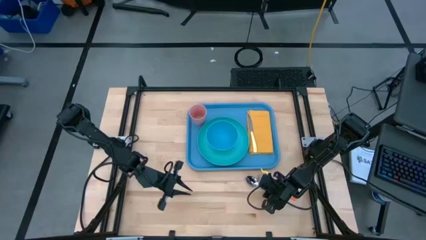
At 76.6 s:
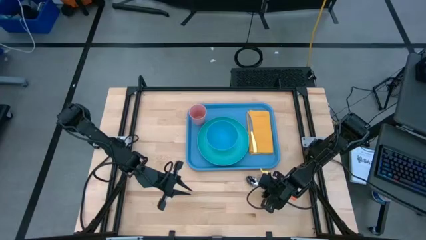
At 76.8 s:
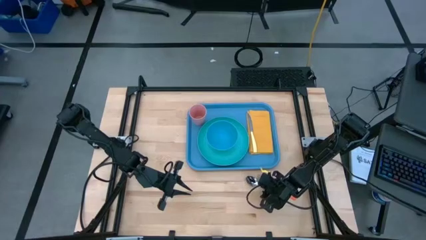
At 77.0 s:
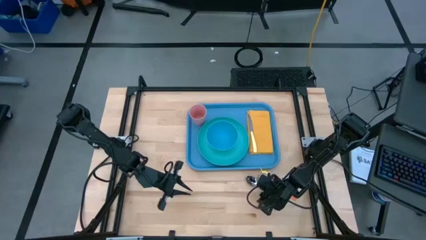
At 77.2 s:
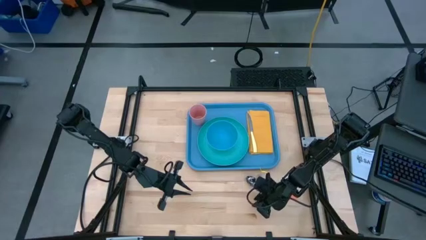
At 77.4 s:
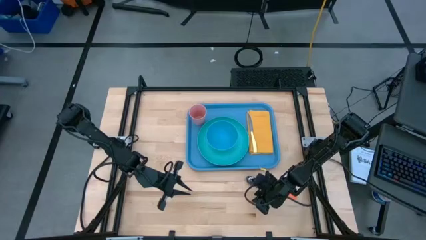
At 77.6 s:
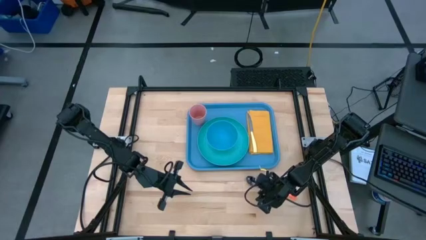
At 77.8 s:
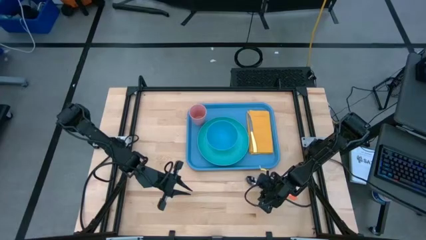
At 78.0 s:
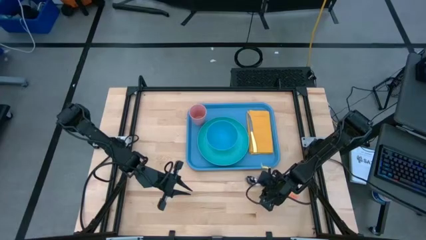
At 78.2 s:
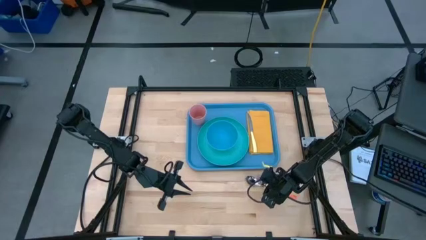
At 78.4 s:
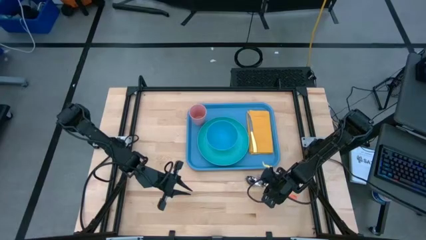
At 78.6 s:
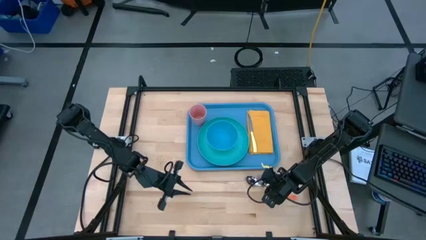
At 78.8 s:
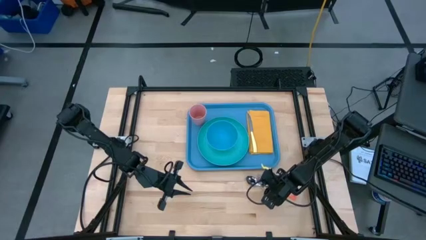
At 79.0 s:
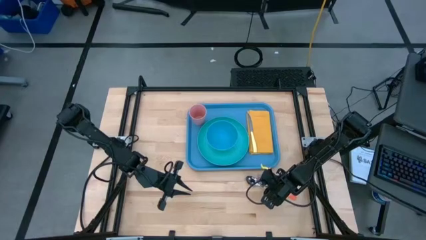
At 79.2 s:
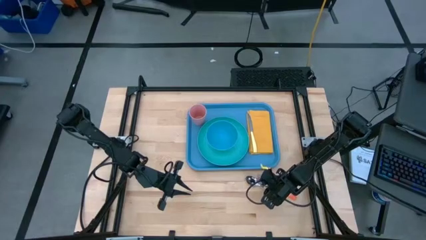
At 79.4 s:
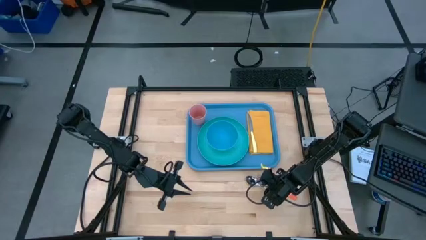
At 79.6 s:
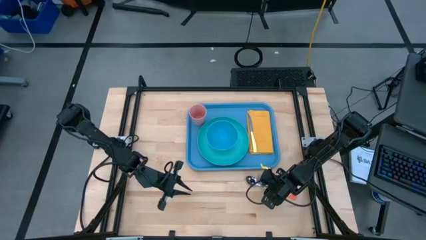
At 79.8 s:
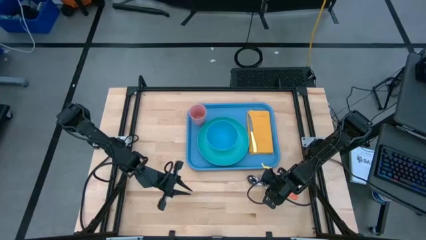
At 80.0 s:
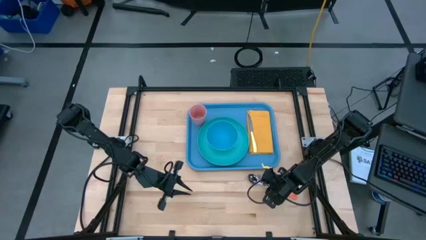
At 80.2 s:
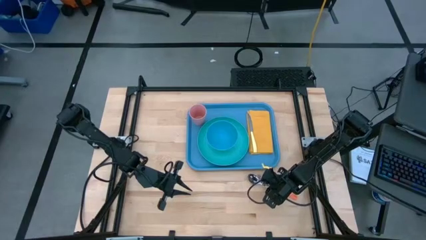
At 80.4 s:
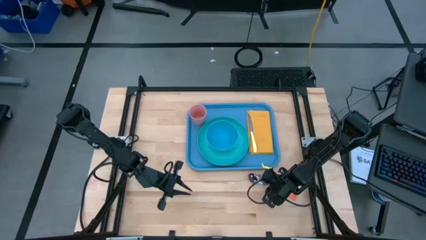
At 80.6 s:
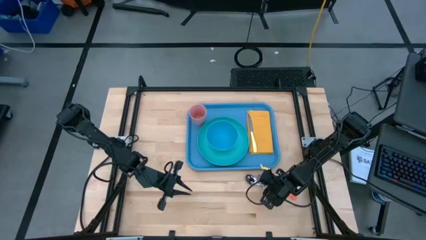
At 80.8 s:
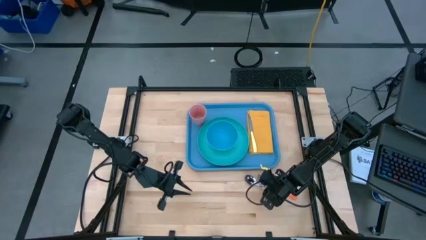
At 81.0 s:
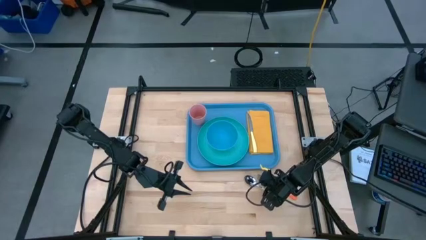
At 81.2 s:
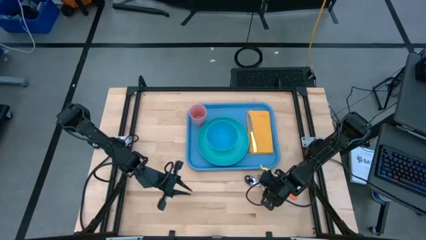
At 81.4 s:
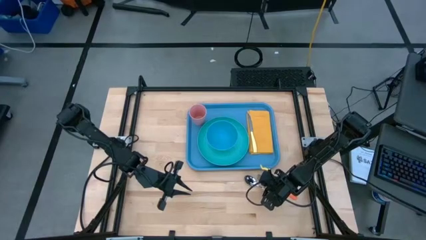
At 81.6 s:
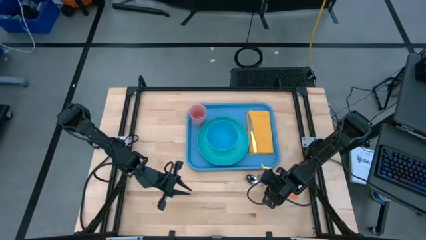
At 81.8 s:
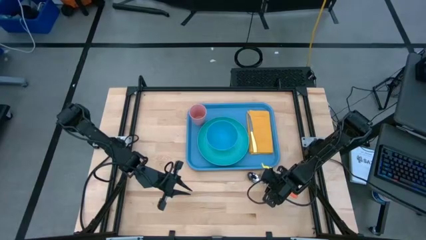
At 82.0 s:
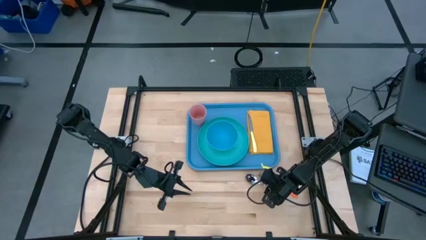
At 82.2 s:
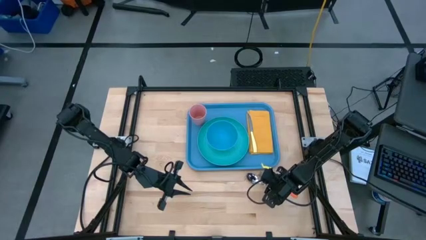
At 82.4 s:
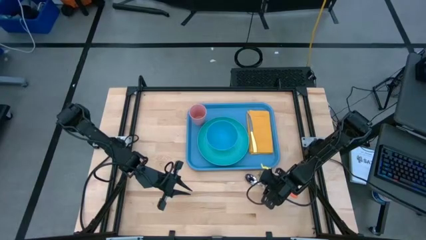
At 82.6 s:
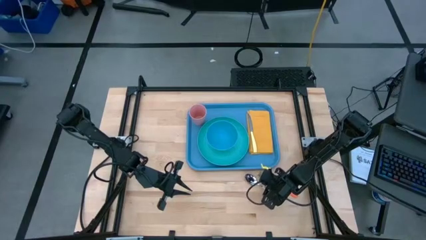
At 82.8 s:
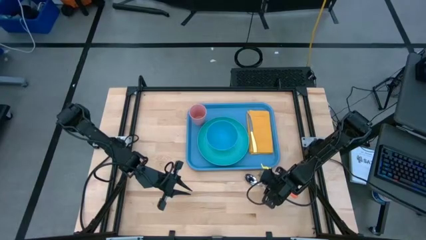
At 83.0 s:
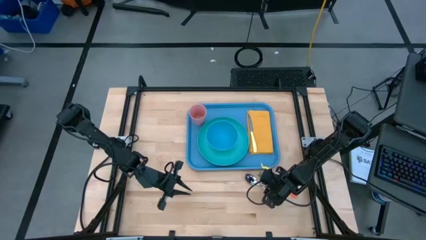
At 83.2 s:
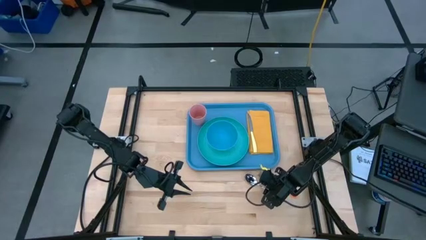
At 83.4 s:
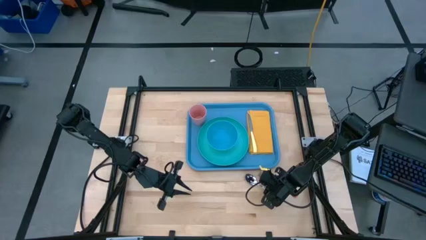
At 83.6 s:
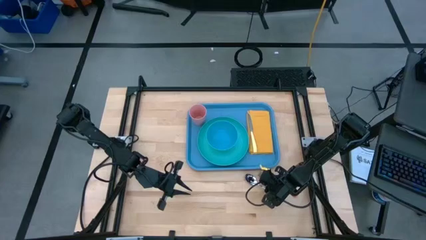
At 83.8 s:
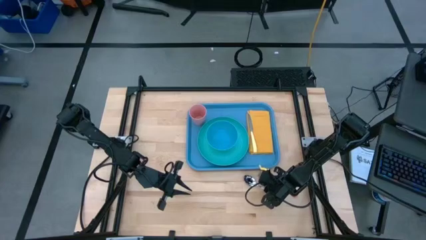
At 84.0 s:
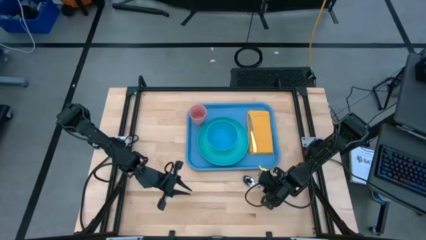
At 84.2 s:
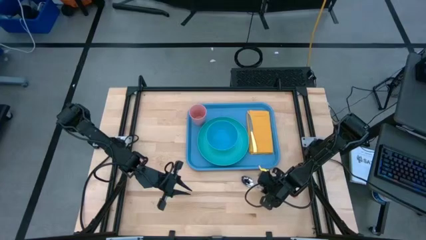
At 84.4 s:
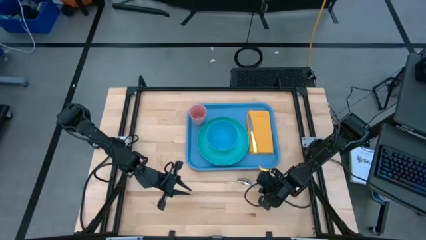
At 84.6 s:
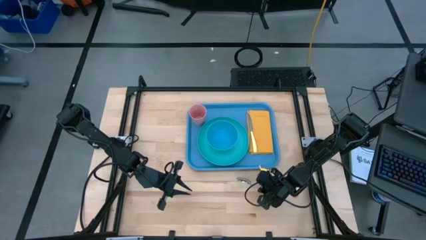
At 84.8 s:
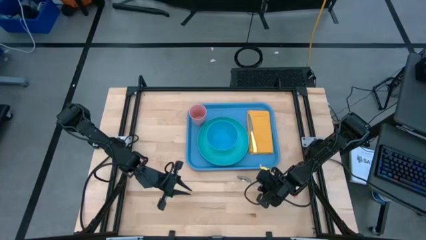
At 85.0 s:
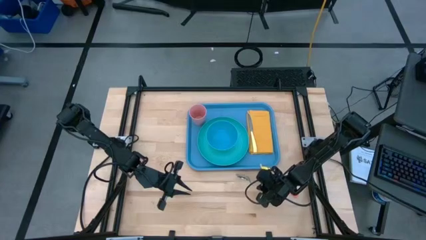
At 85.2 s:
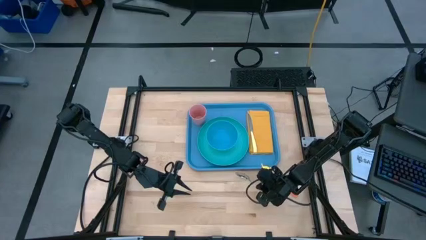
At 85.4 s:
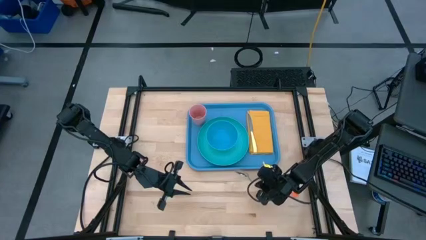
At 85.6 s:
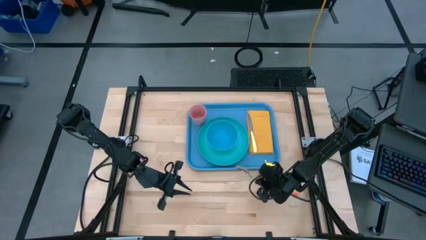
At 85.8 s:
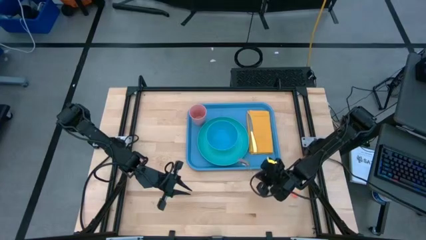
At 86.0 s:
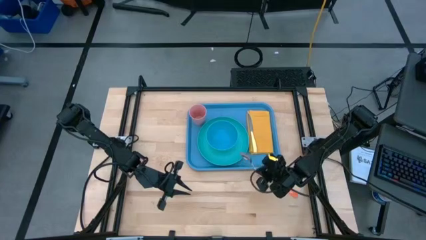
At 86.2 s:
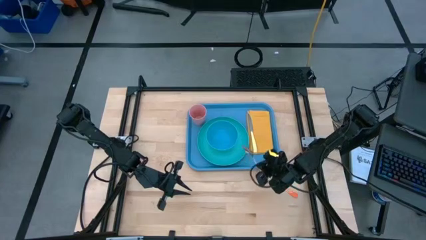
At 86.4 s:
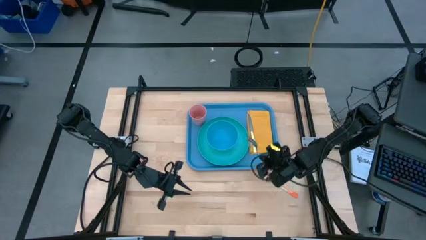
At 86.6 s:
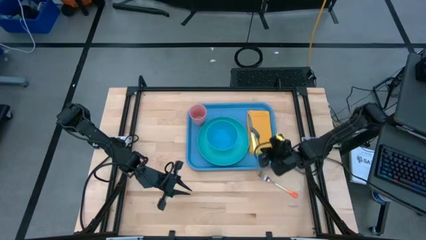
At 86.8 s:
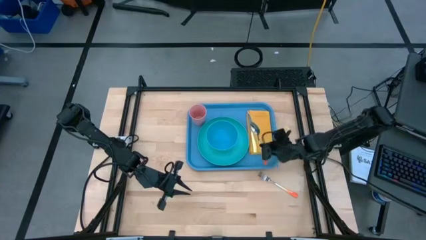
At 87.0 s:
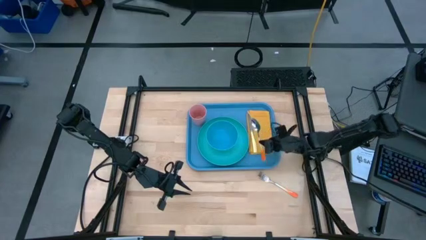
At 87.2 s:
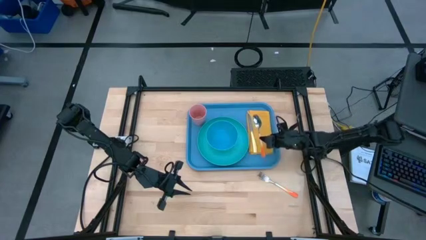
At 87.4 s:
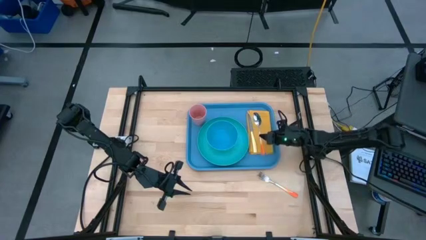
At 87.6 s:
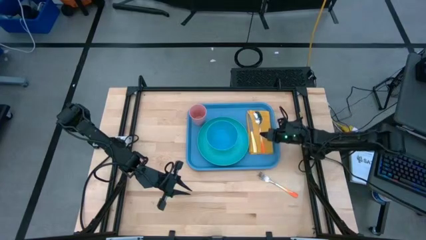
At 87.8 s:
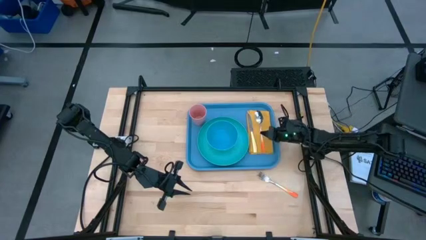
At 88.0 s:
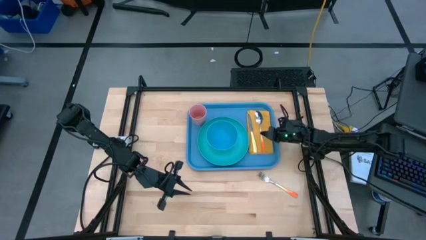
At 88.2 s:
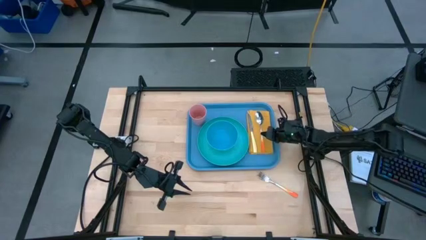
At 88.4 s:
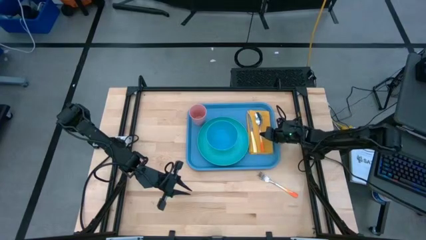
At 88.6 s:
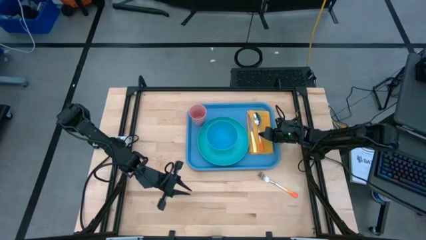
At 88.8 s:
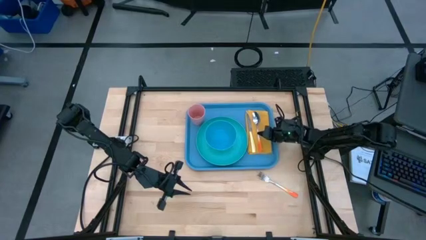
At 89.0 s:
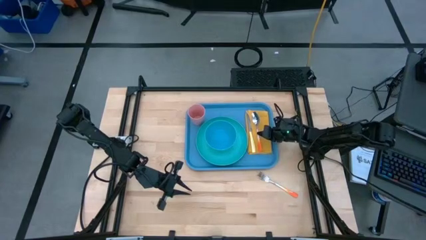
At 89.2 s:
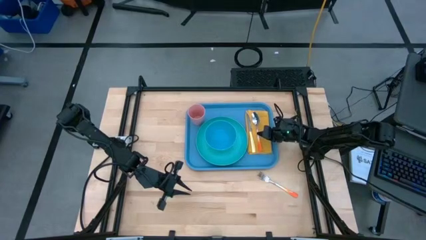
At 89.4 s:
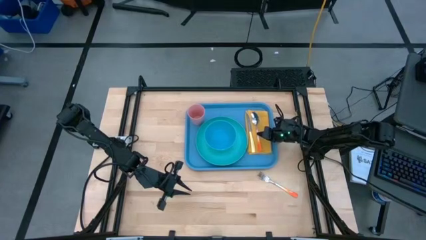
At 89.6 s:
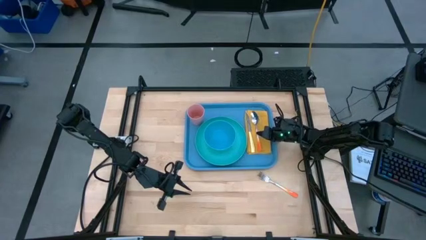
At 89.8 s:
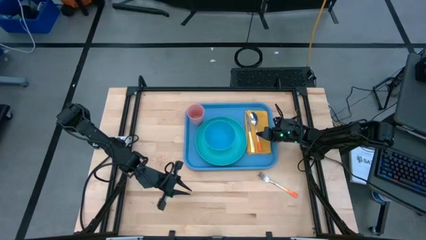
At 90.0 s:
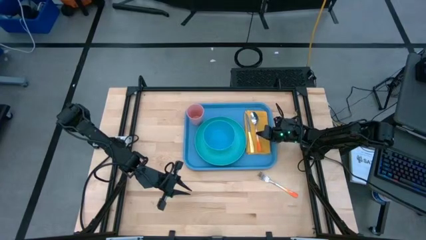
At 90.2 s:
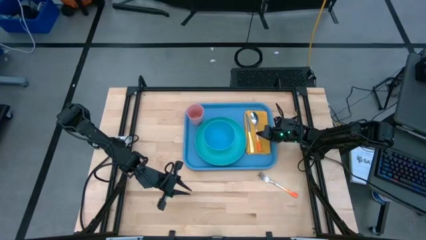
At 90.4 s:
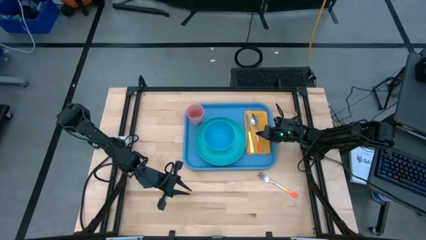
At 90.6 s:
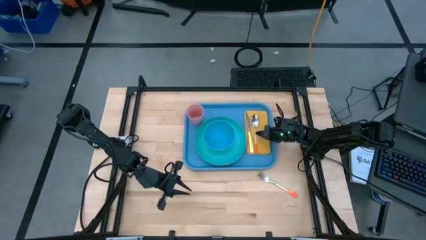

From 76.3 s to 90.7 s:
Task: Set up tray
Put the orange spoon on top of the yellow napkin to the right of the yellow knife
